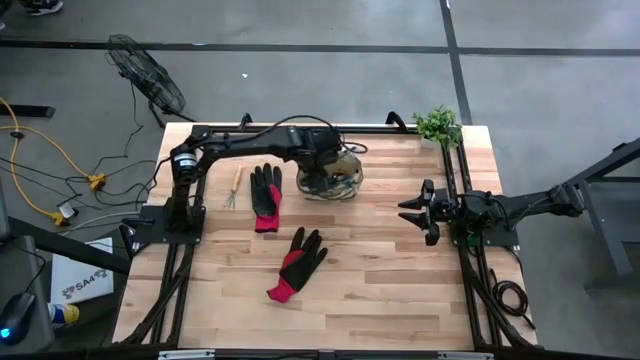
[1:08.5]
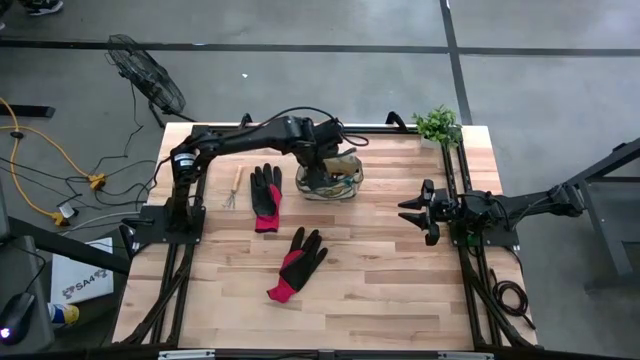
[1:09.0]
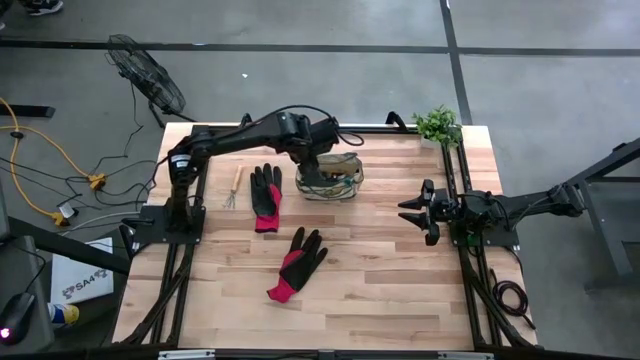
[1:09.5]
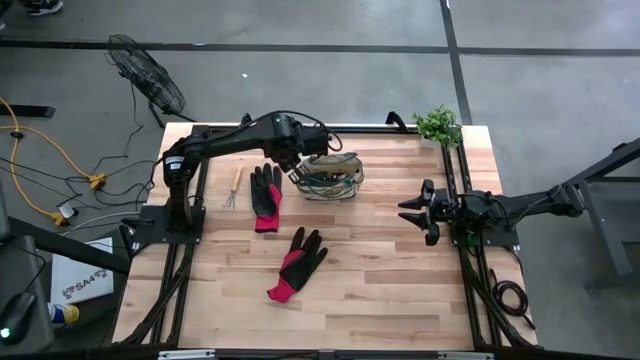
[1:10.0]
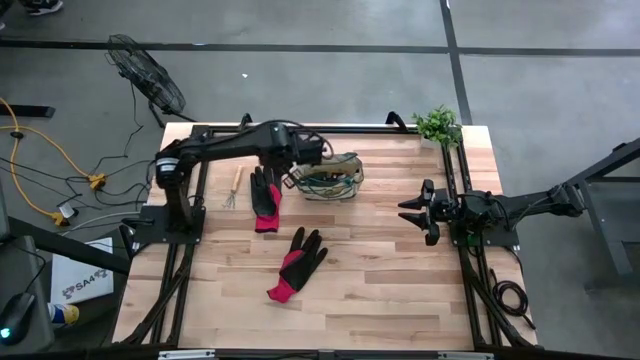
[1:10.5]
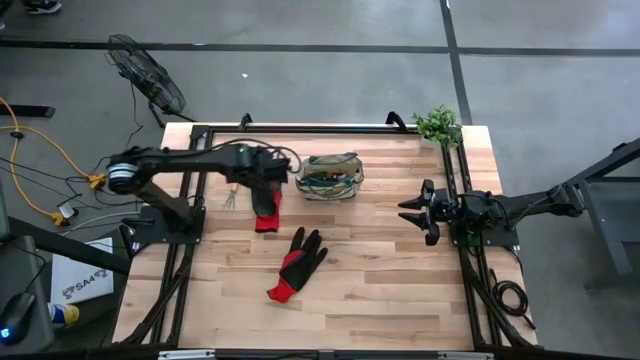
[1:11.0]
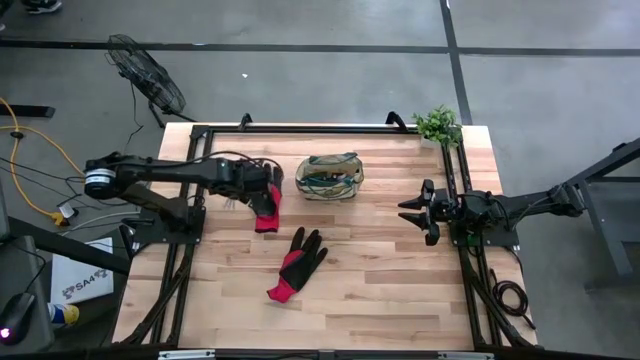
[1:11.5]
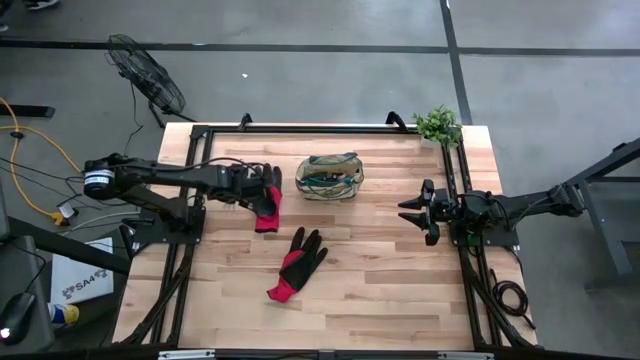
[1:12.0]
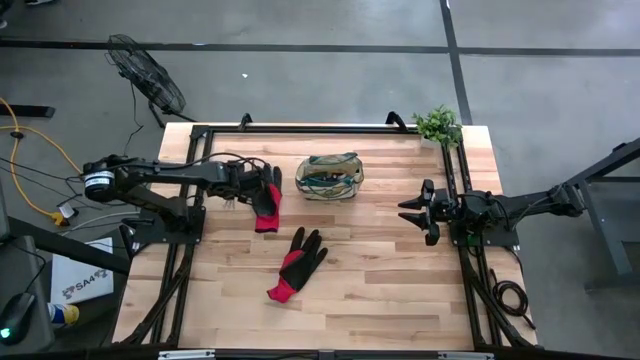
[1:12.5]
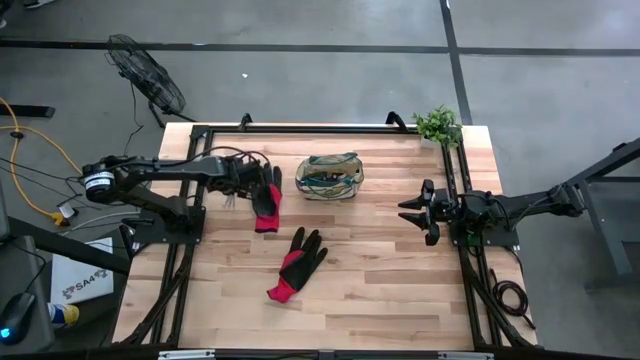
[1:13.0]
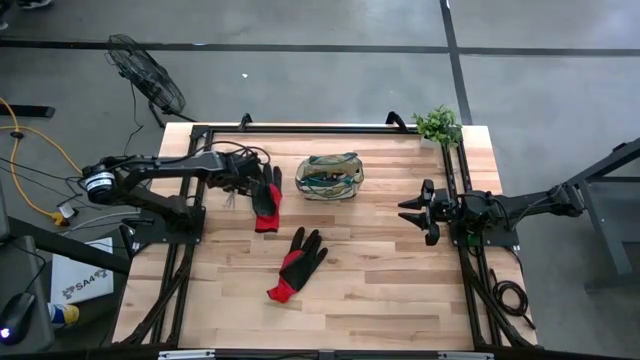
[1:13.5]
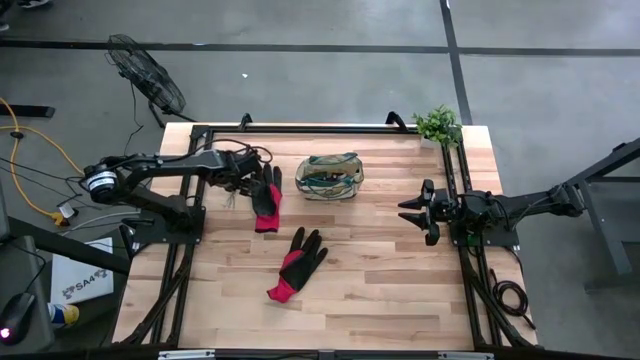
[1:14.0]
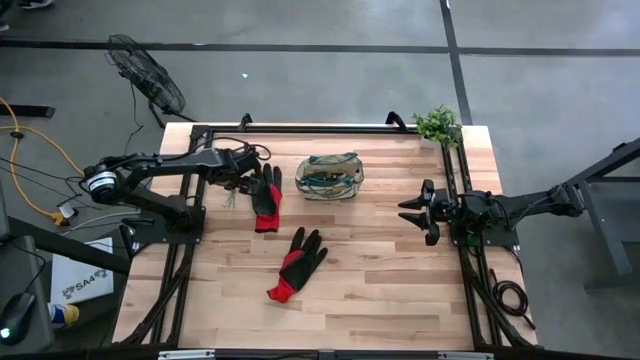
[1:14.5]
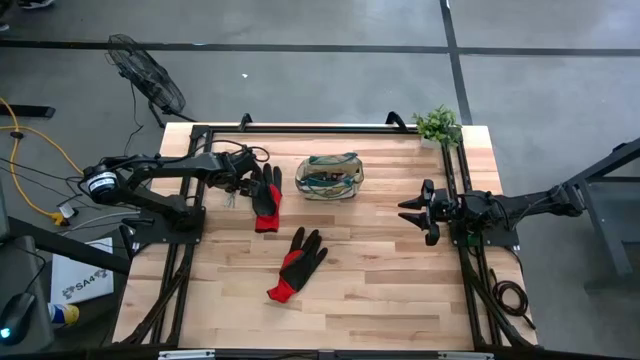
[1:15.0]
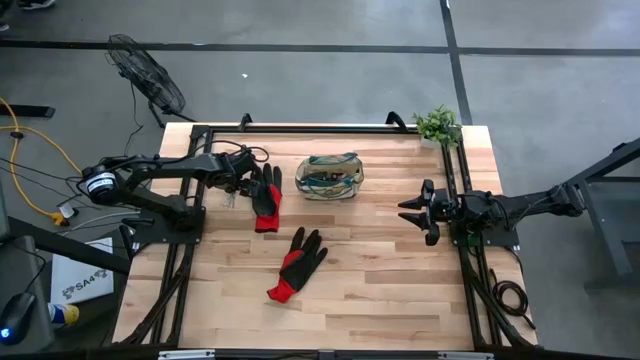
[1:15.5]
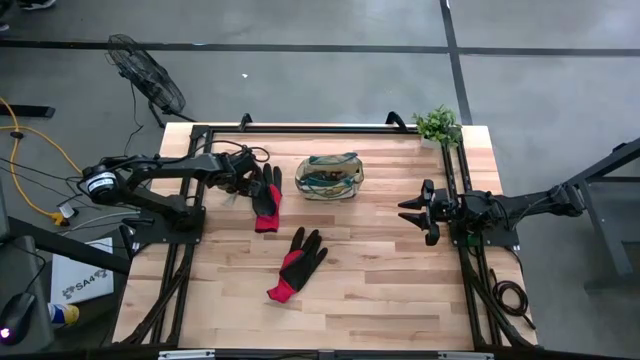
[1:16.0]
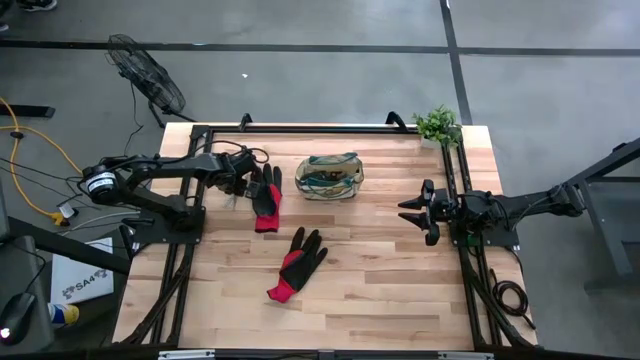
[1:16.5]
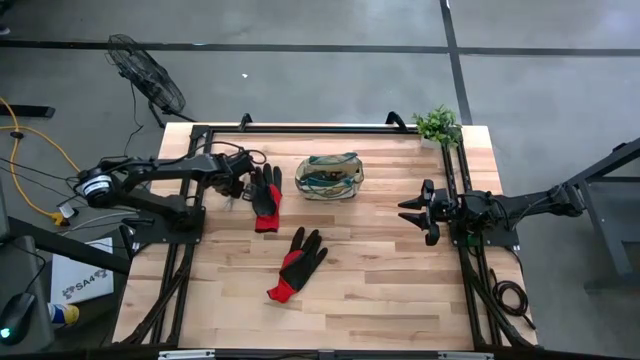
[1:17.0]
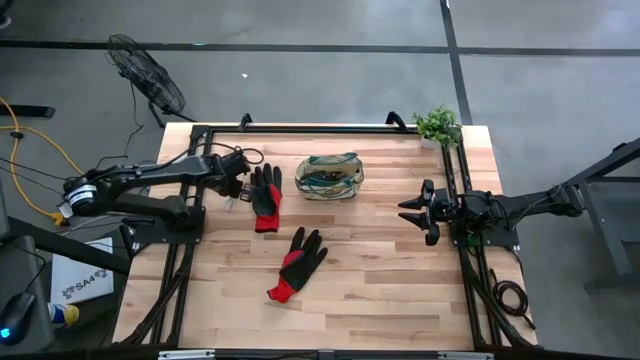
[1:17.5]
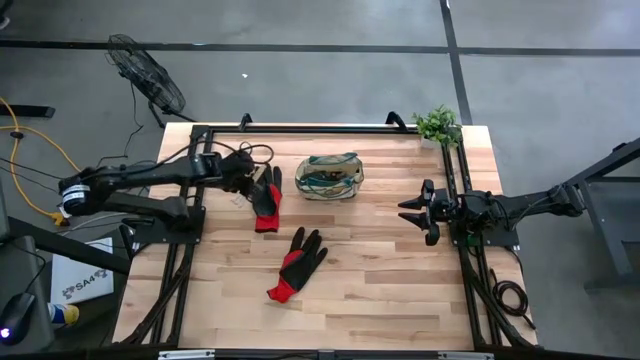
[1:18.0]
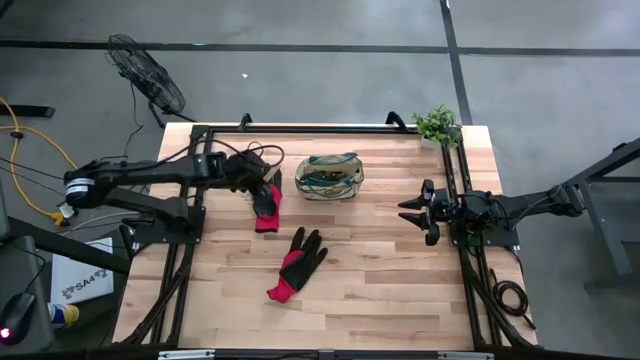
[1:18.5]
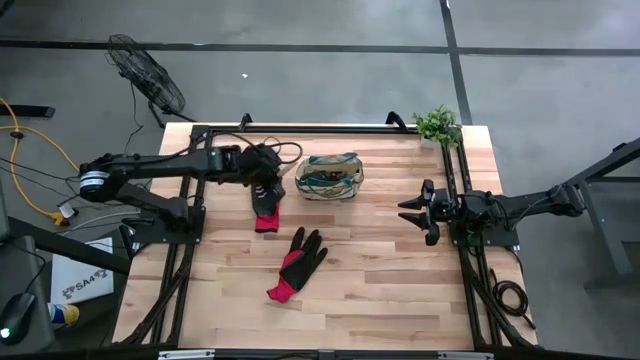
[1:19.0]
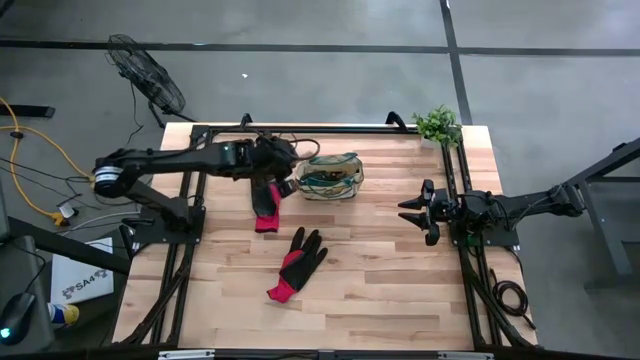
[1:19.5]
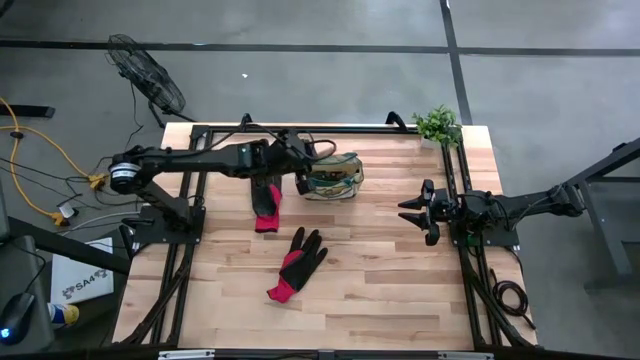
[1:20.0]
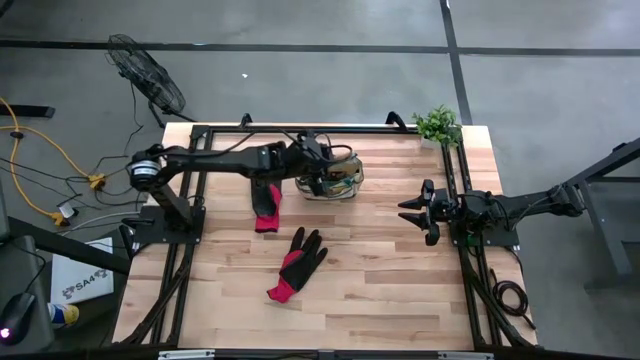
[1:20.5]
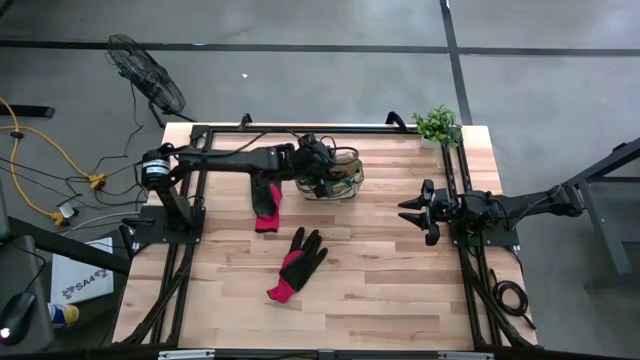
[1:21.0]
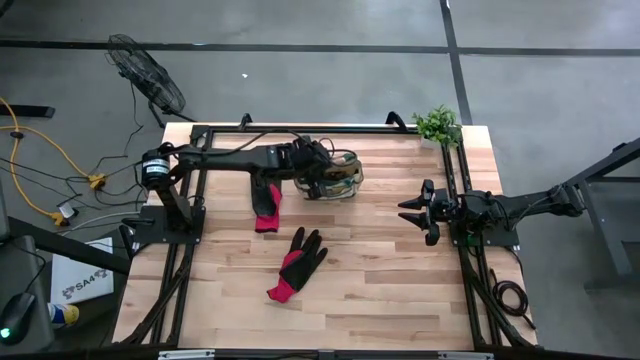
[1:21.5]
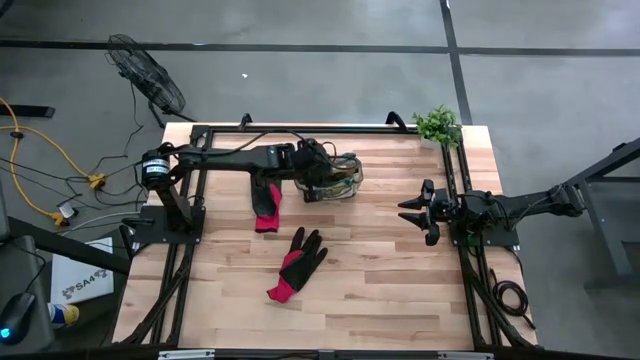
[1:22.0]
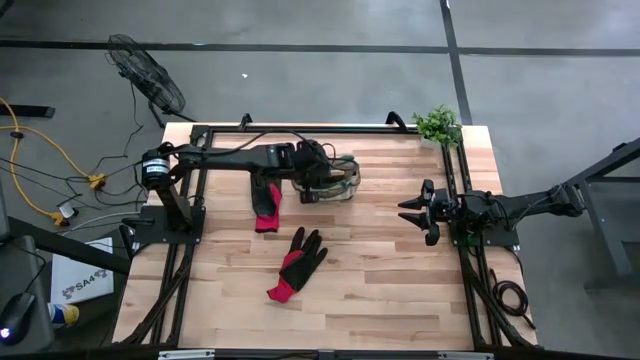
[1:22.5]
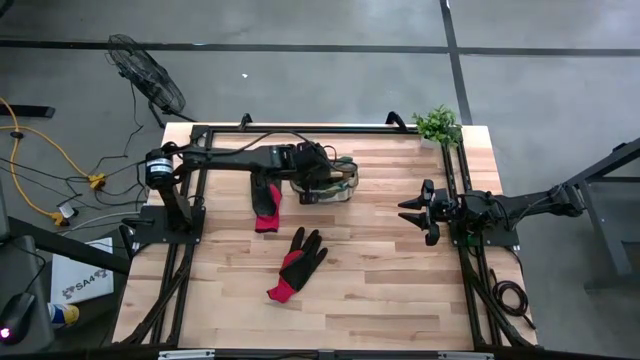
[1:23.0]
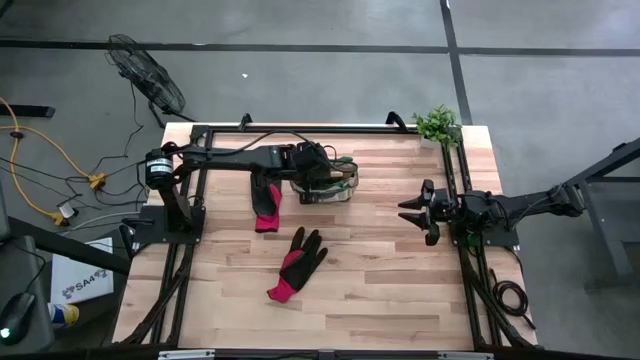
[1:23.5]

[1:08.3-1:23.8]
Task: Pick & Place Garden tools in Gardening bag
Put the brown hand rake into the gardening bag

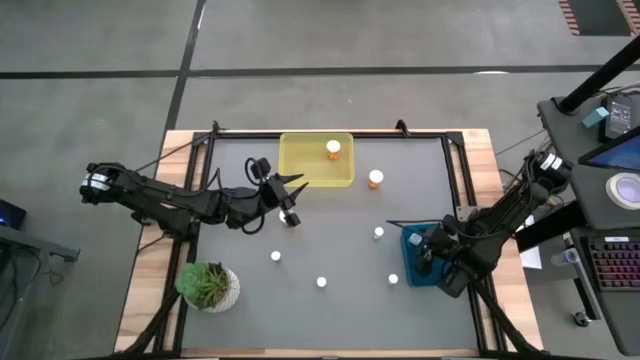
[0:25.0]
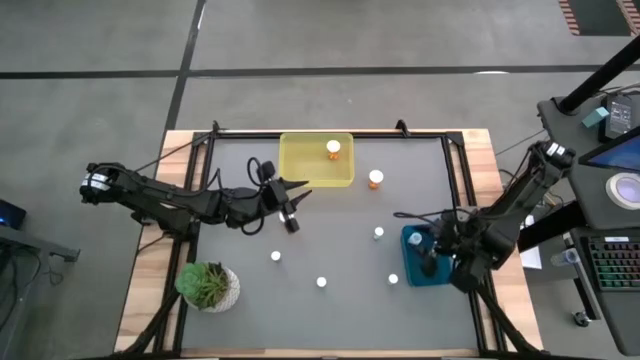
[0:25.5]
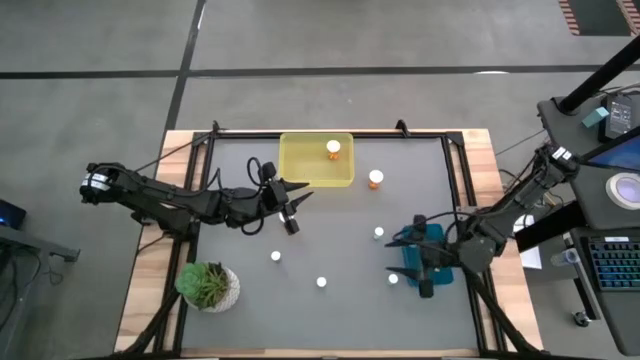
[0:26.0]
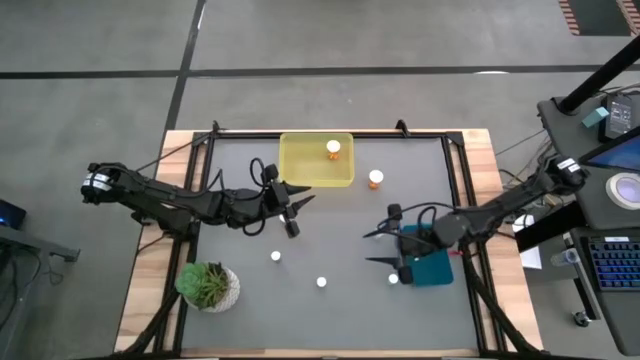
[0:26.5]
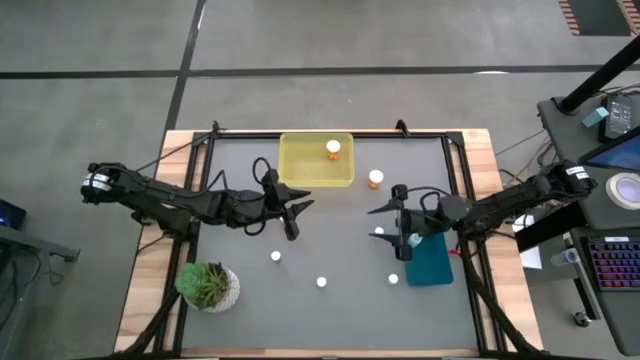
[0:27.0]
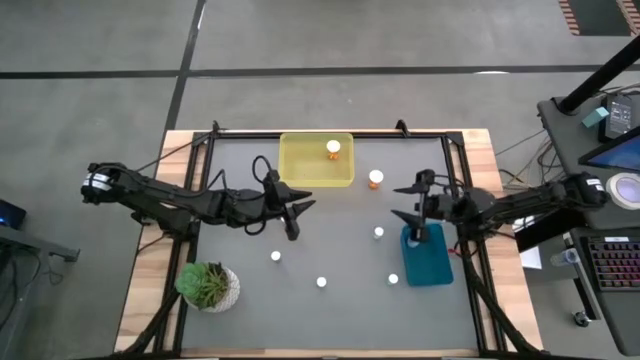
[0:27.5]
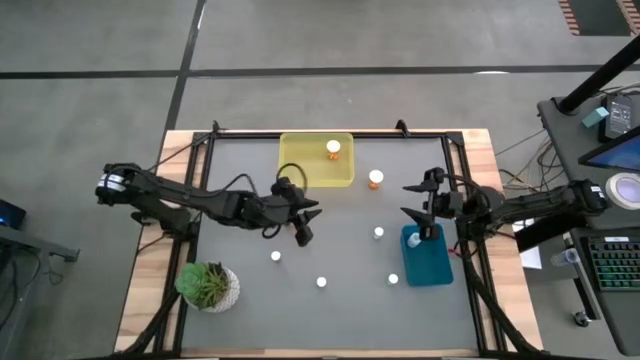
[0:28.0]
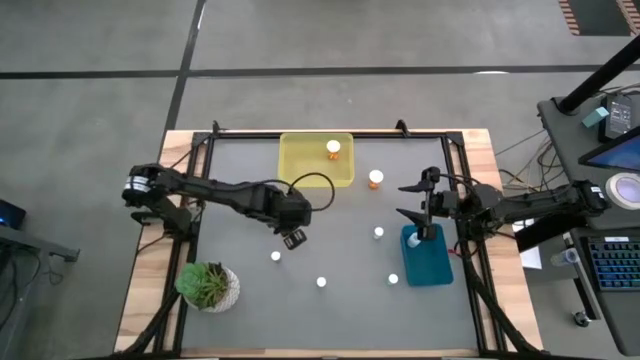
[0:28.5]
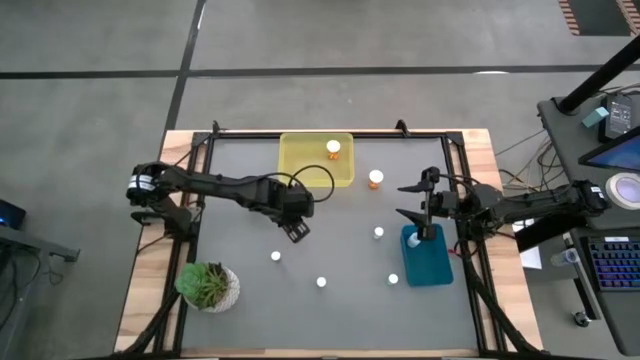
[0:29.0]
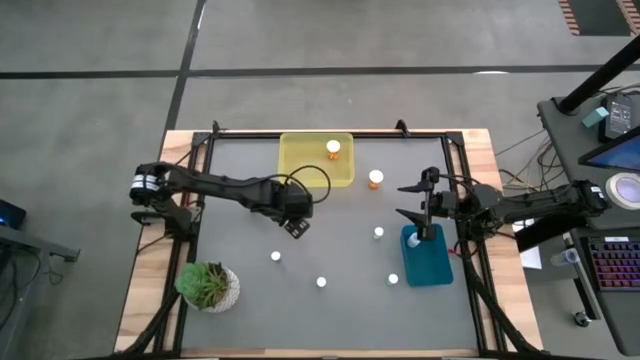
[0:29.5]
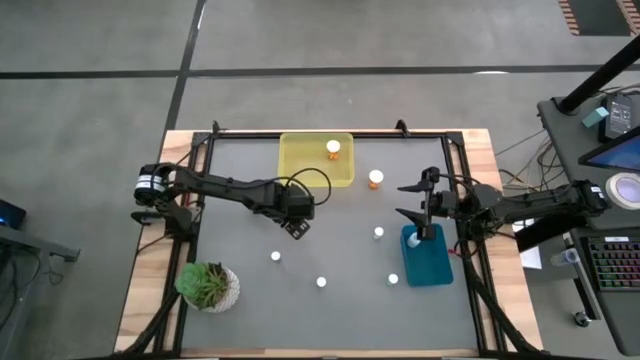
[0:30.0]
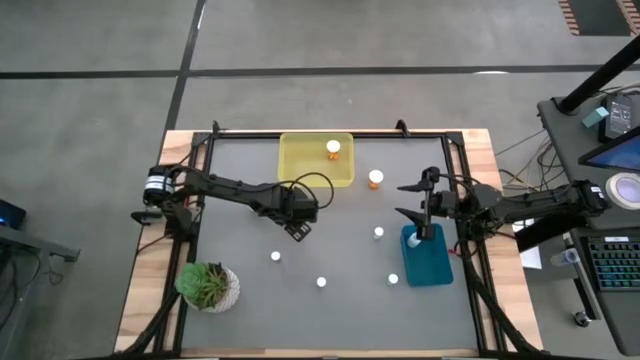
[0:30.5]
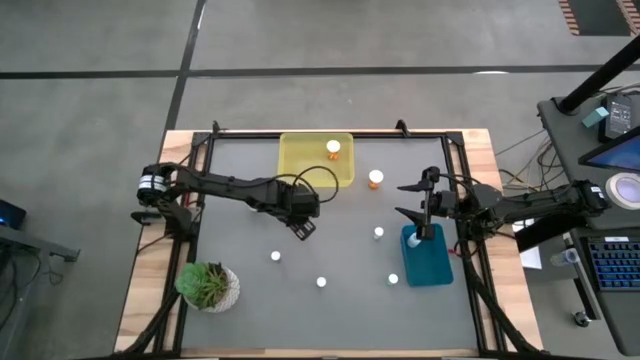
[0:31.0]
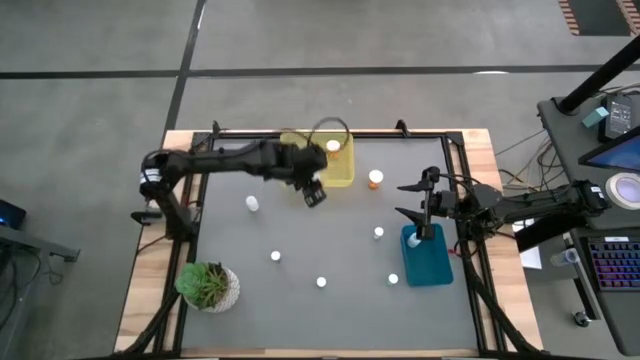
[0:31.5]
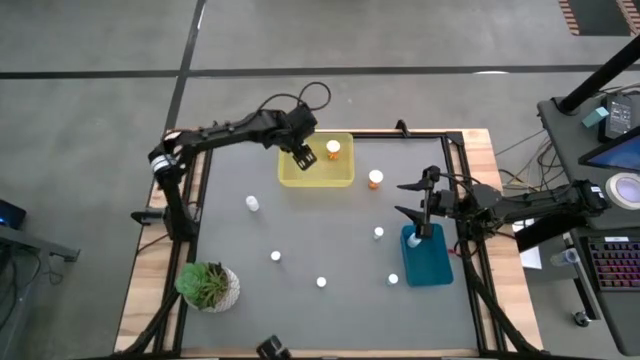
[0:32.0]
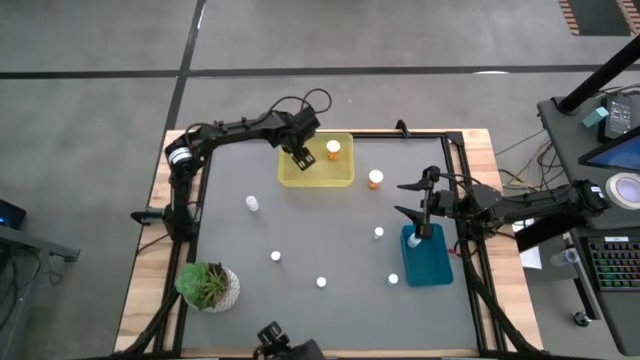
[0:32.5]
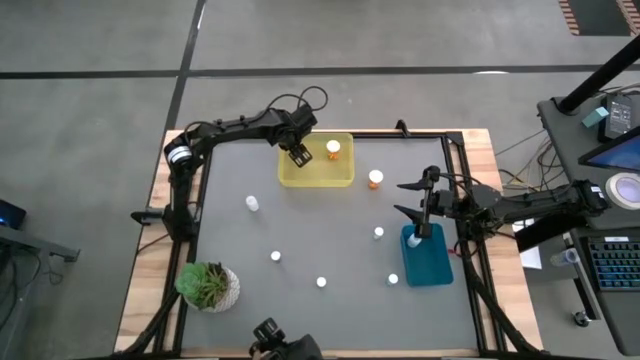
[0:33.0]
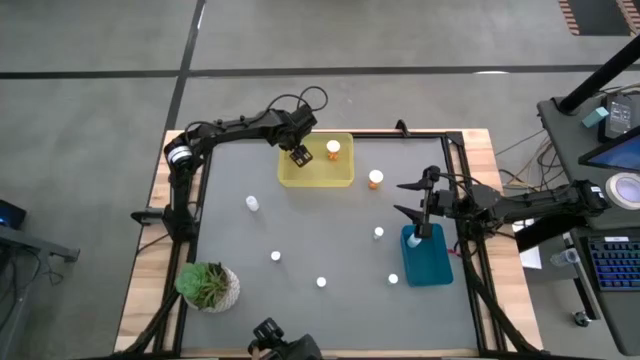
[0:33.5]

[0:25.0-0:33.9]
Task: Pick and place medicine bottles into bin by pill shape (circle, oval)
Put the orange pill bottle into the yellow bin
